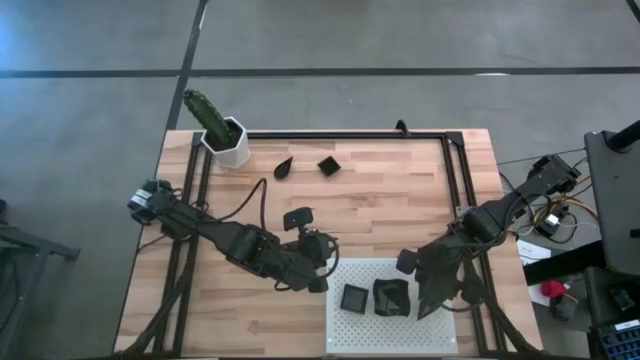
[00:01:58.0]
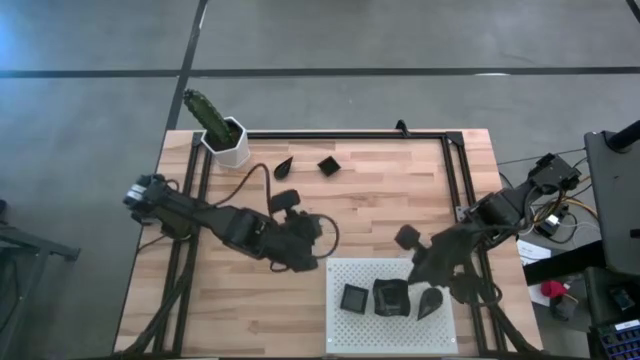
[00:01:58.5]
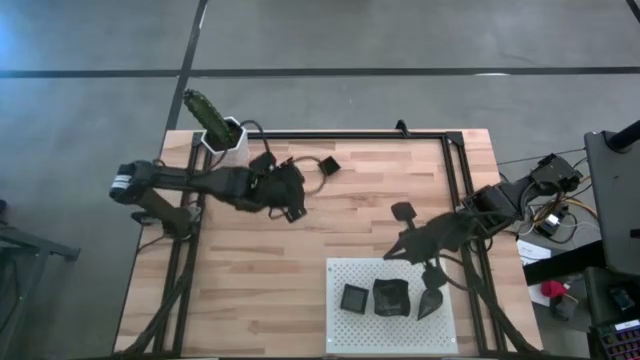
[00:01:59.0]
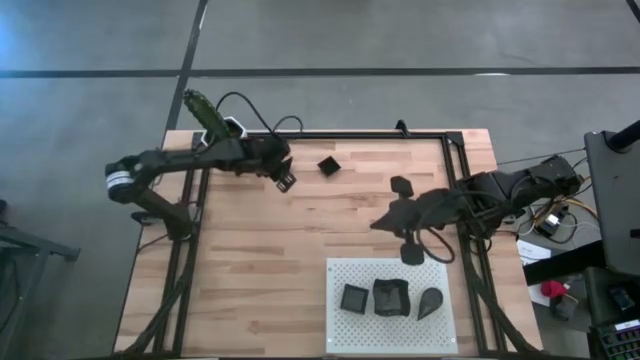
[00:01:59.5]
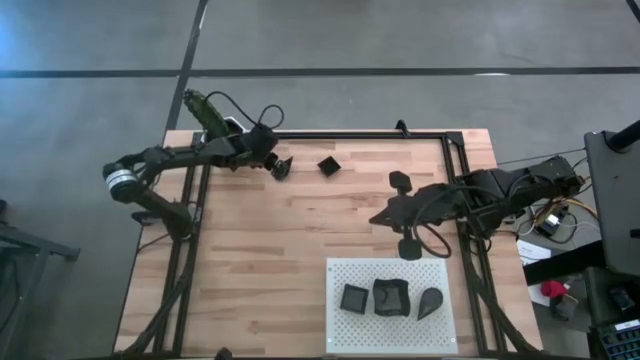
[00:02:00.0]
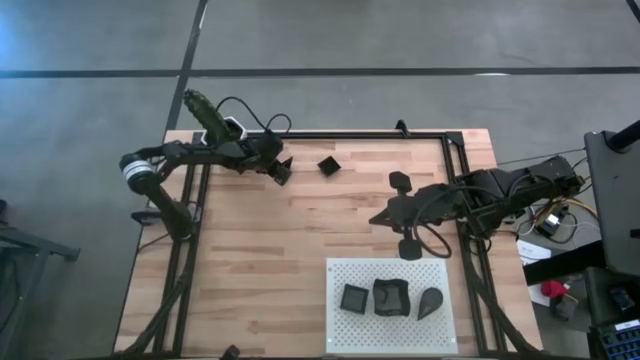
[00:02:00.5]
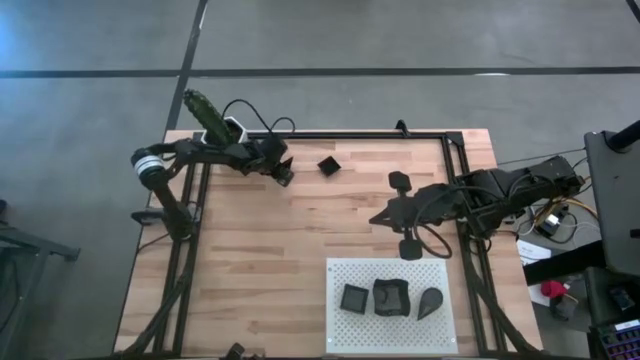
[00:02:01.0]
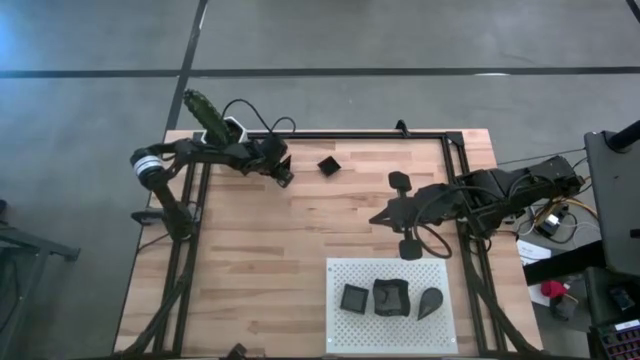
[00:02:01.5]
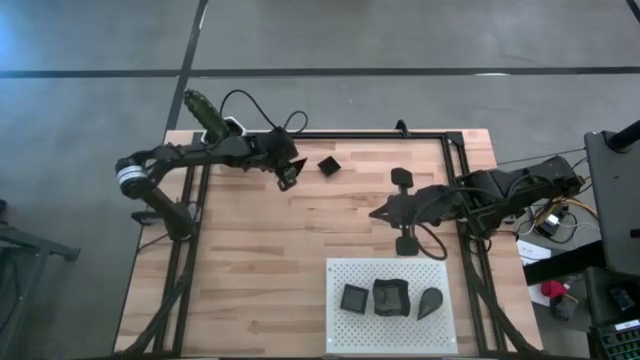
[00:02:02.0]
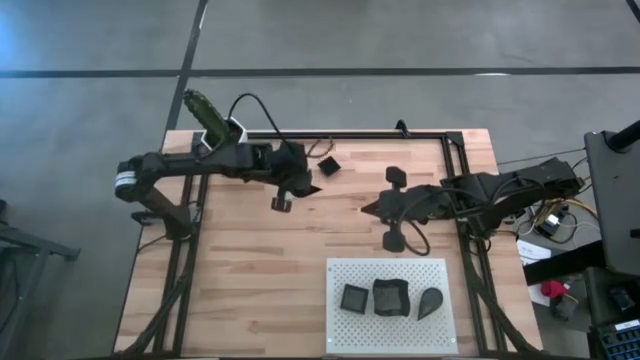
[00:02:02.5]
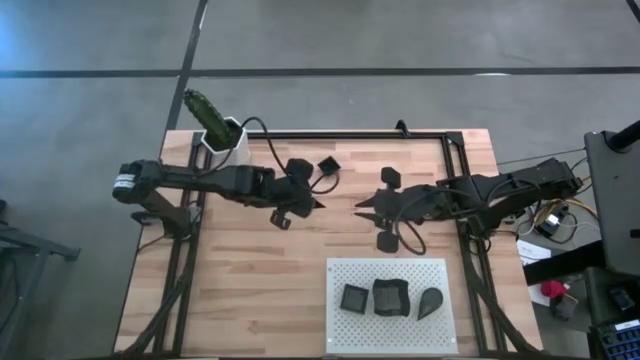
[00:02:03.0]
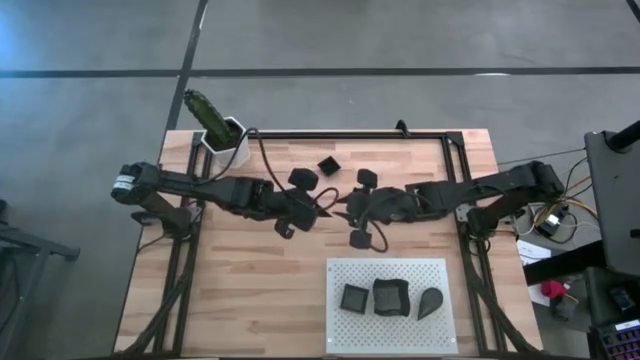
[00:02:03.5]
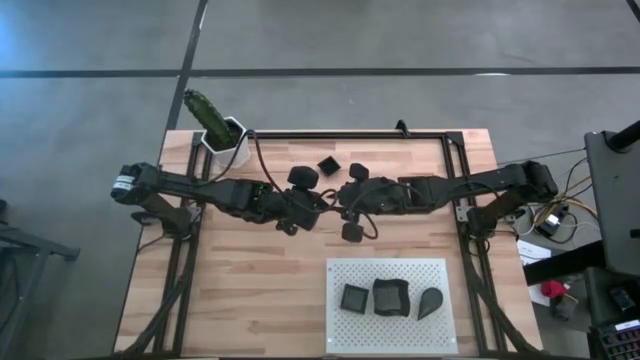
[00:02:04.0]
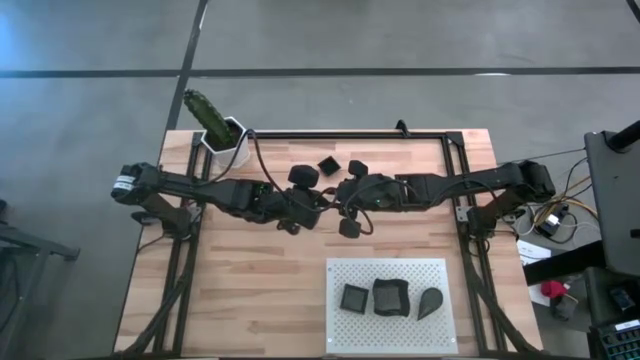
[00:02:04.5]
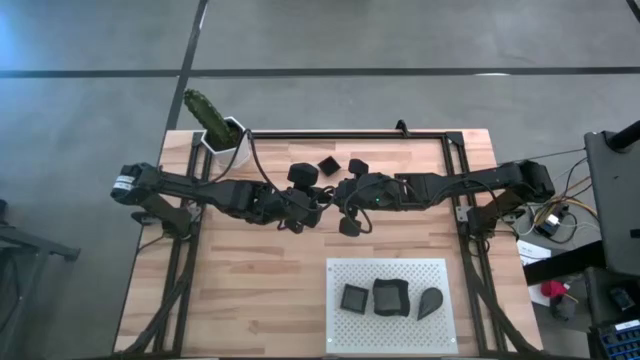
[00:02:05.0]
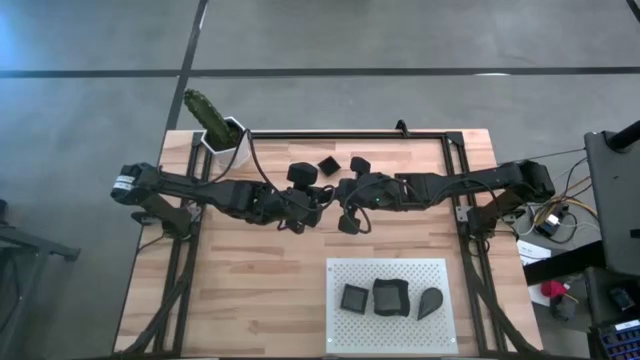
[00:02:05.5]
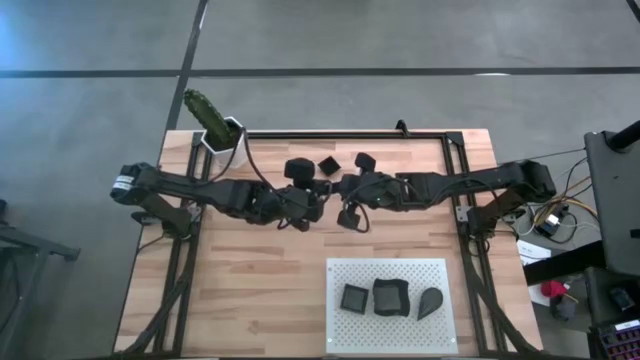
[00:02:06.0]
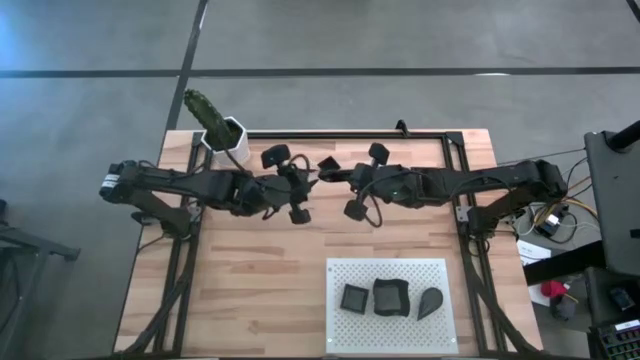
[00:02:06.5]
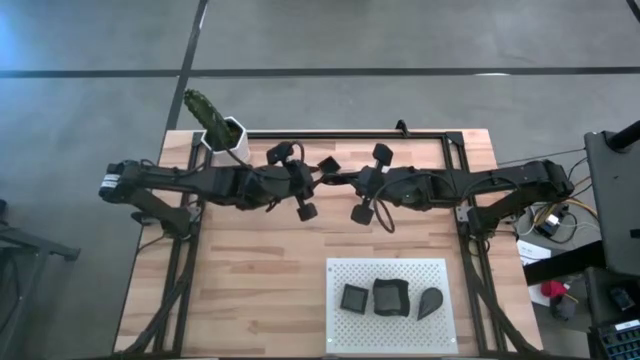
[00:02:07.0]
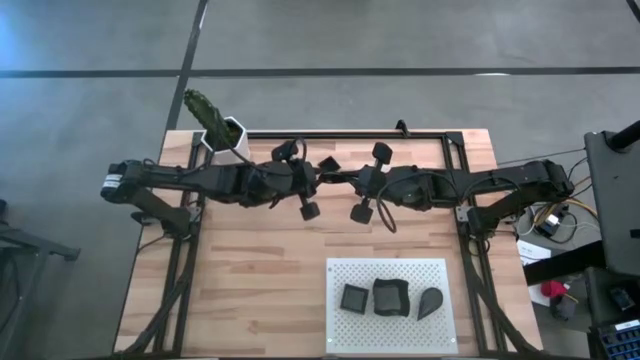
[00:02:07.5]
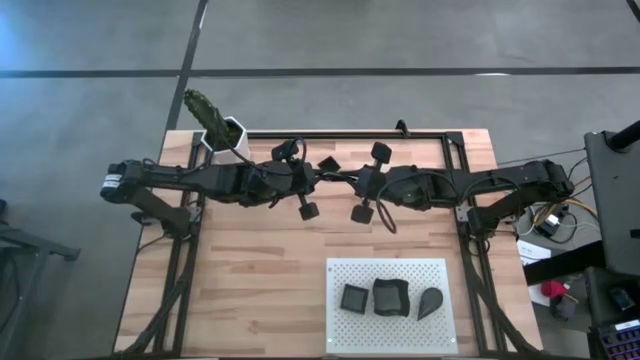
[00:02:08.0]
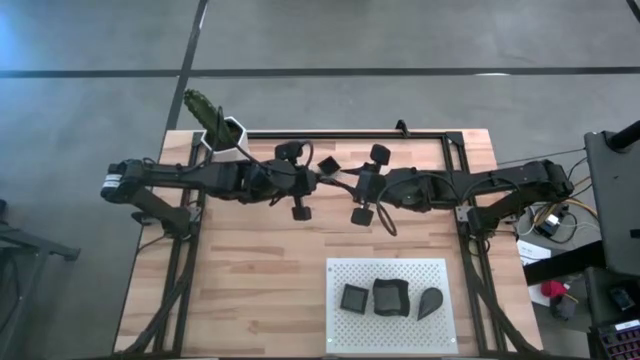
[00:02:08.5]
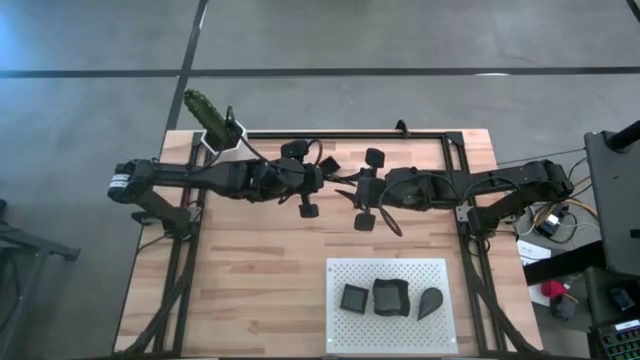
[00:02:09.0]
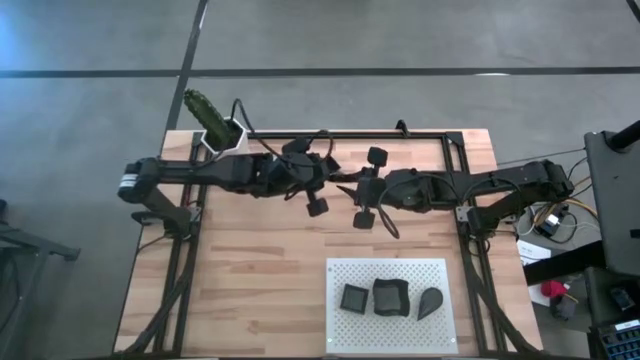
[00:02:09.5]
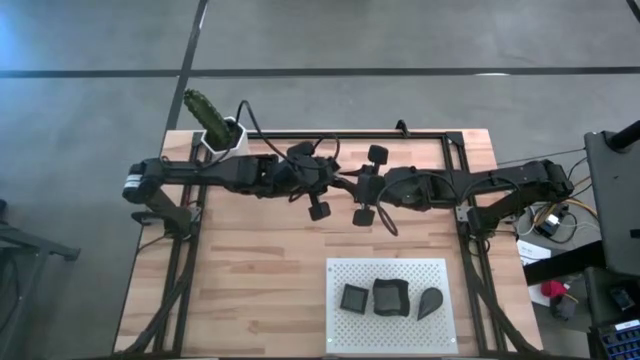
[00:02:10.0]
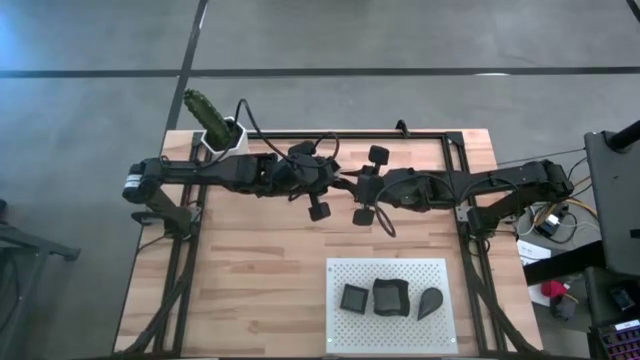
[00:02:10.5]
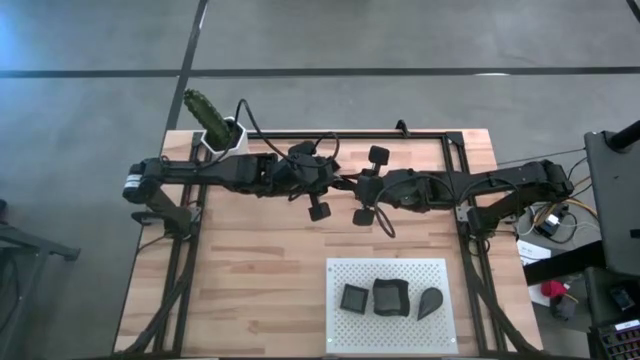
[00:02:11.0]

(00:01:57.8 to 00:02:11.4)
Task: Pick & Place Mini shaped plates
Stack the drop-shaped plate on top of the drop-shaped plate on the shelf

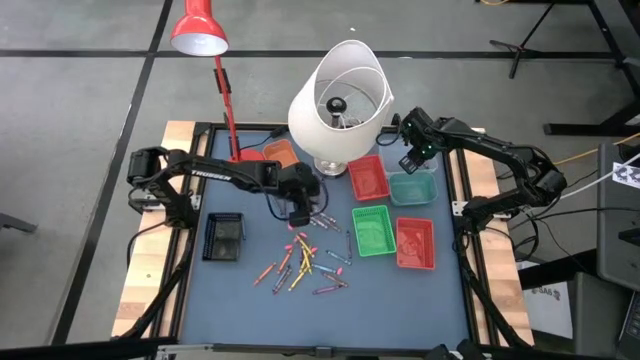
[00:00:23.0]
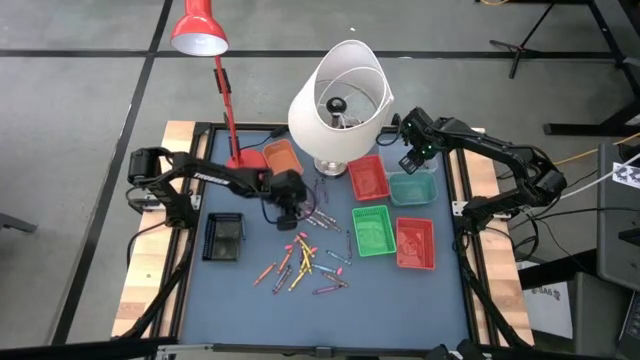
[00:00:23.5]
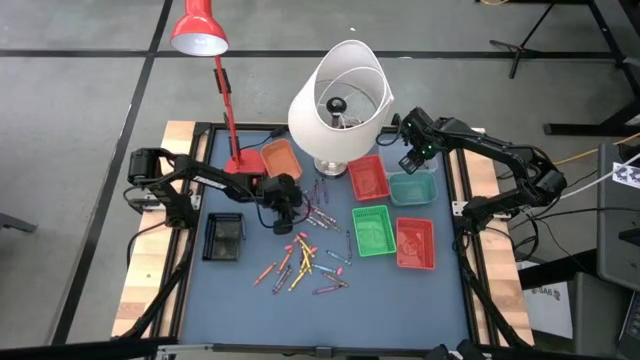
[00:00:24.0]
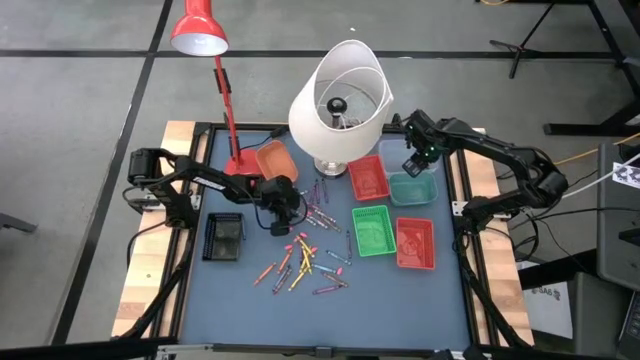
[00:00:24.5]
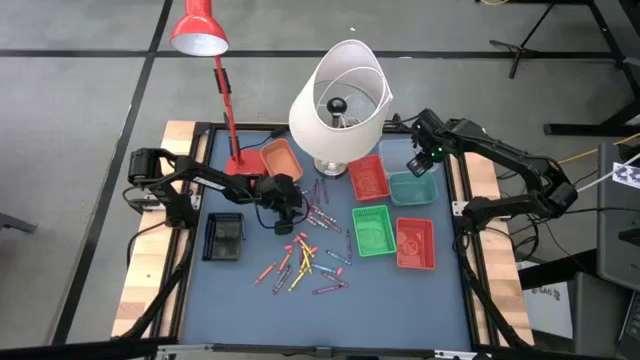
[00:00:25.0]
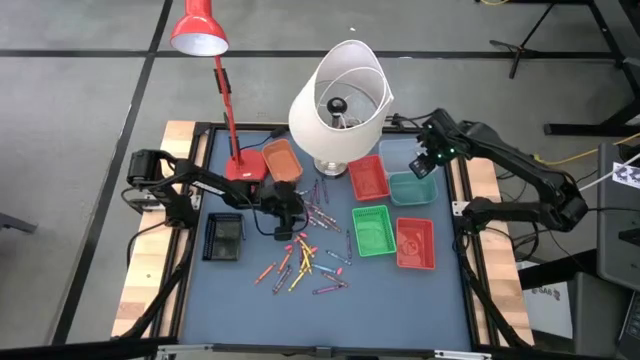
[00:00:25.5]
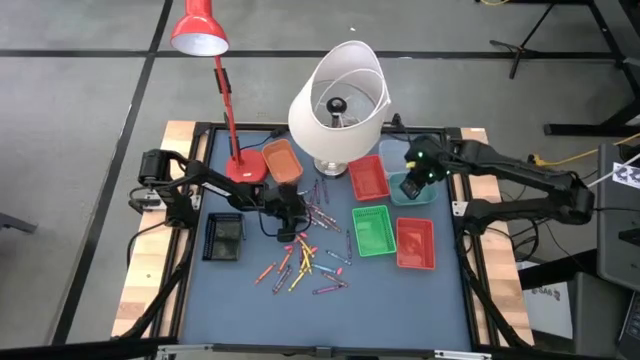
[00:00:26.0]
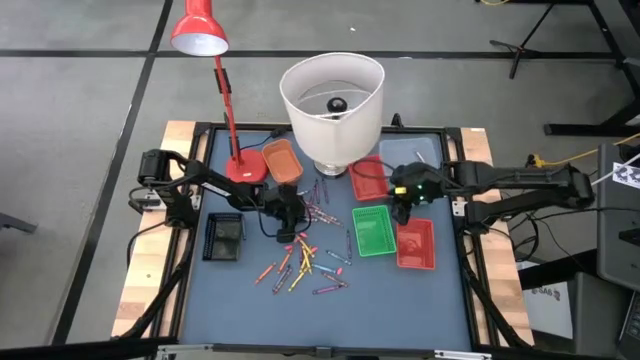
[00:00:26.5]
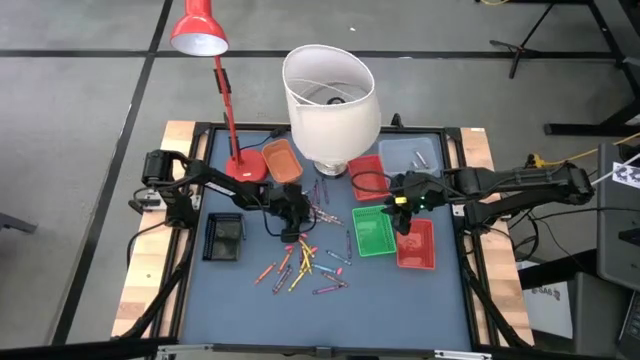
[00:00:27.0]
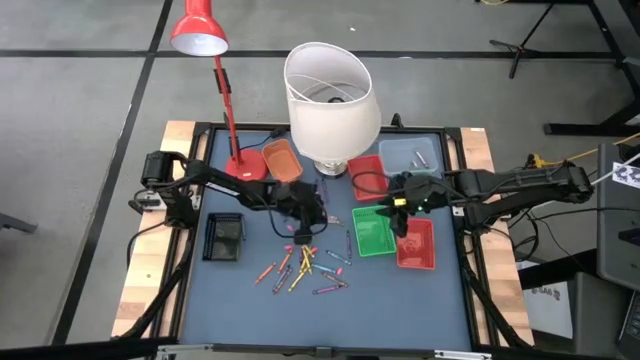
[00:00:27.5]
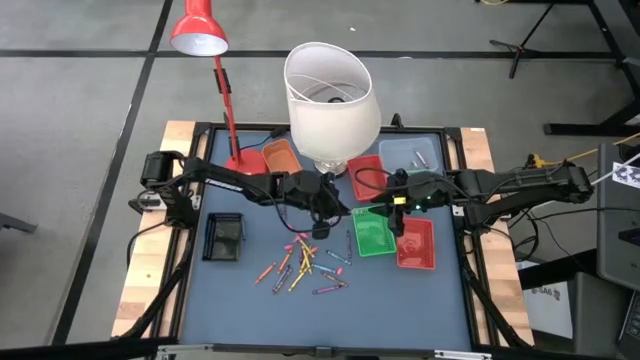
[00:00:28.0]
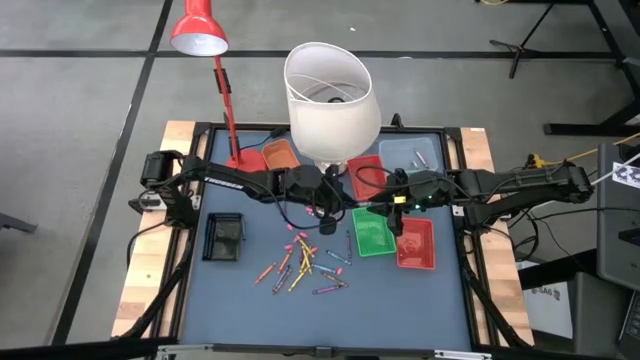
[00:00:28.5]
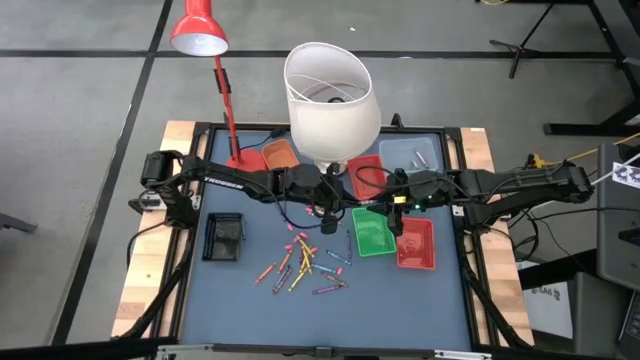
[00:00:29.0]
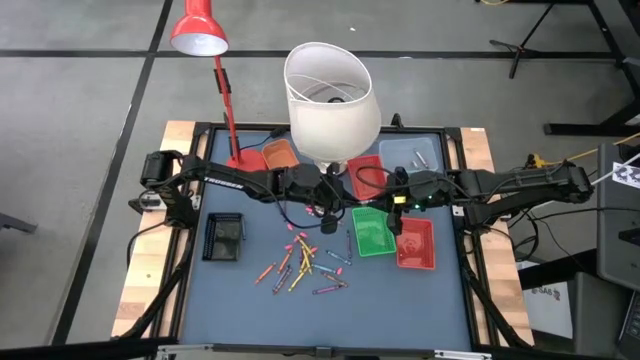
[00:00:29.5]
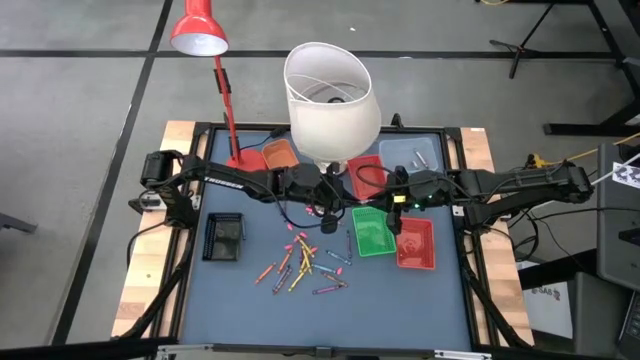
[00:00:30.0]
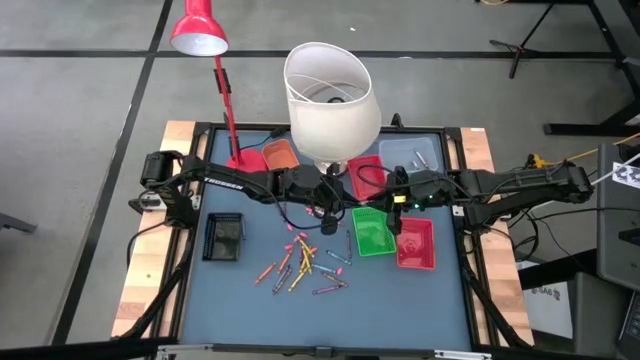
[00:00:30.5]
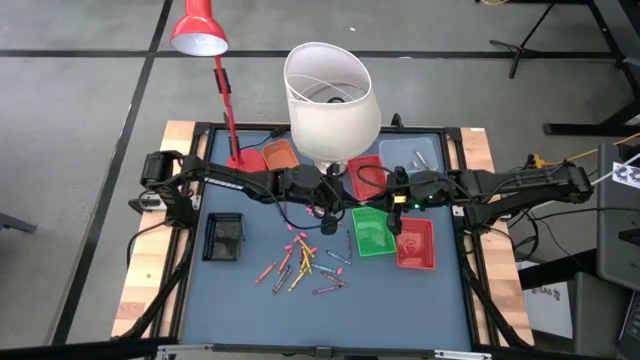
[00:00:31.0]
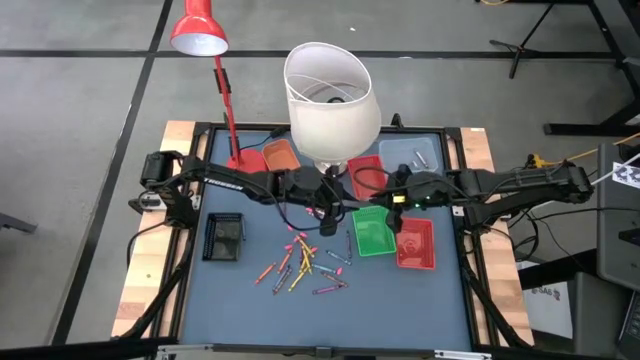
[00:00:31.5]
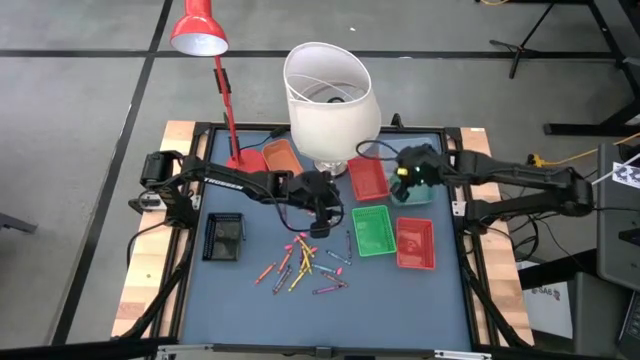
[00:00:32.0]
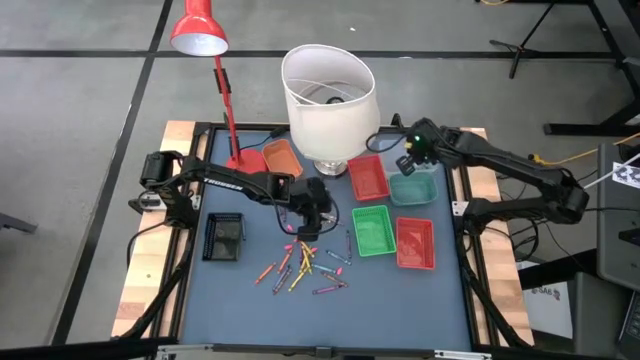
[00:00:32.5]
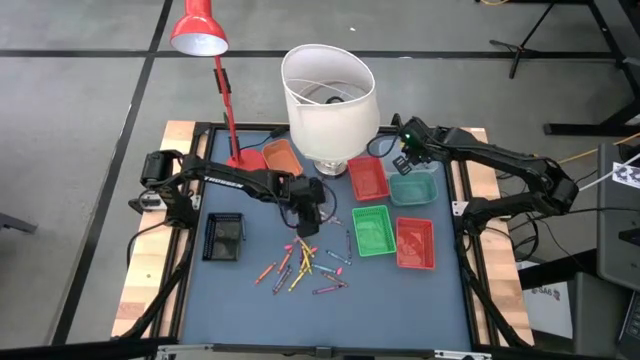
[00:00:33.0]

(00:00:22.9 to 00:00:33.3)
Task: Sort crayons
Put the gray crayon into the transparent bin
